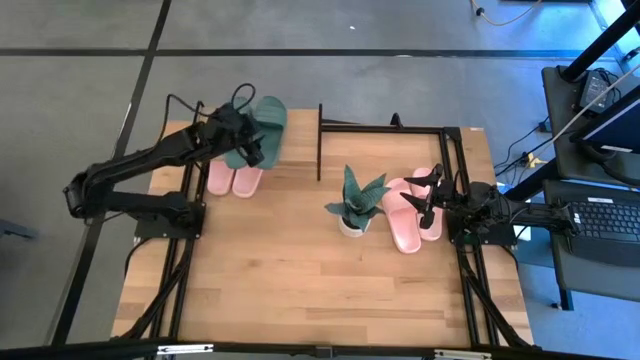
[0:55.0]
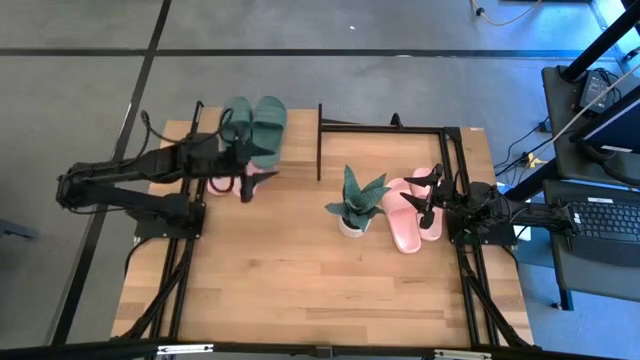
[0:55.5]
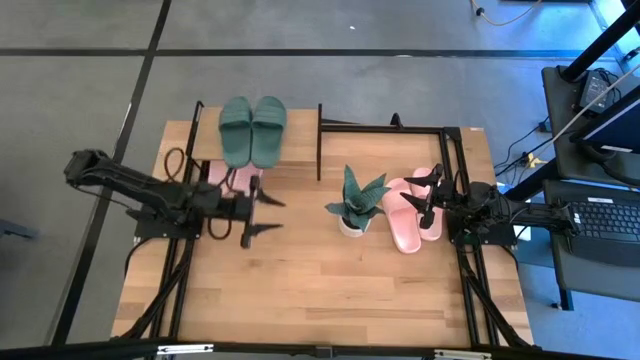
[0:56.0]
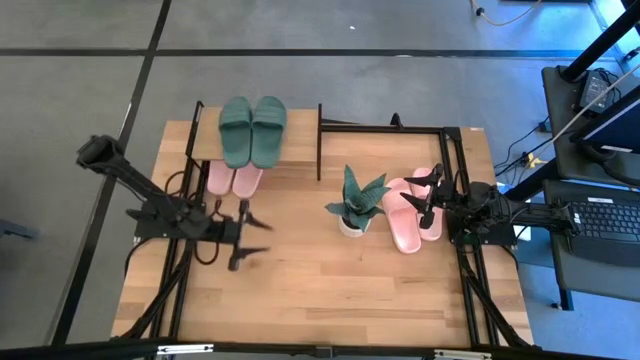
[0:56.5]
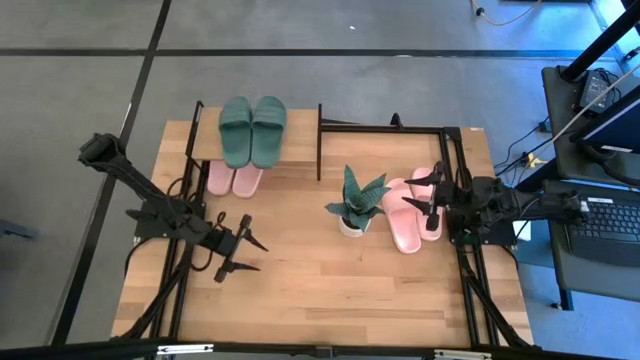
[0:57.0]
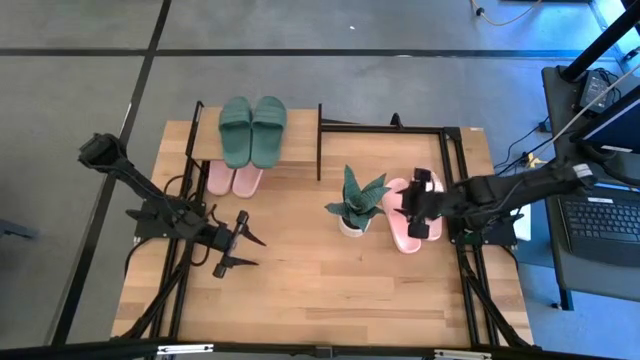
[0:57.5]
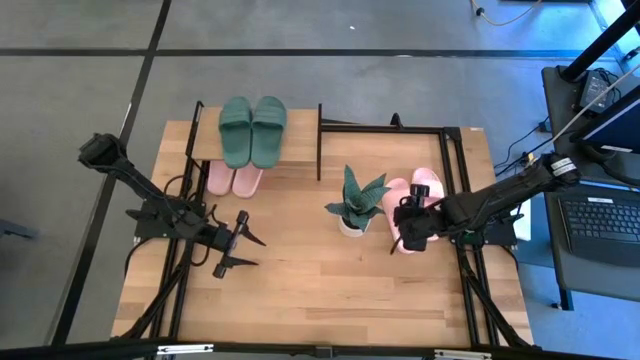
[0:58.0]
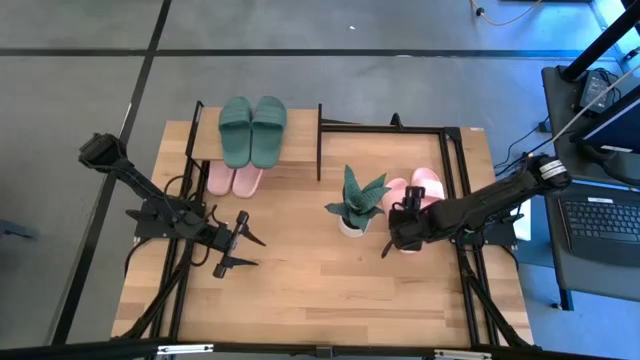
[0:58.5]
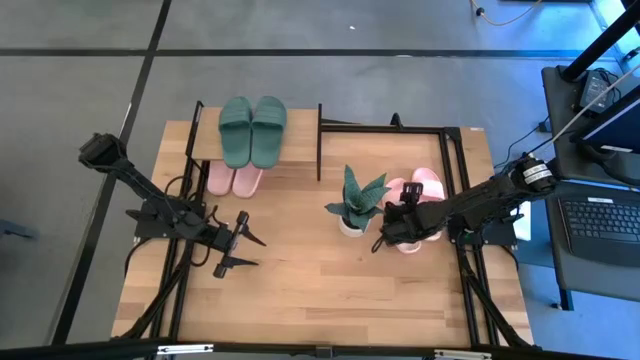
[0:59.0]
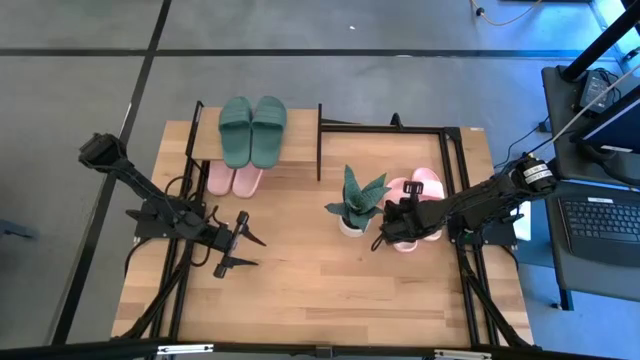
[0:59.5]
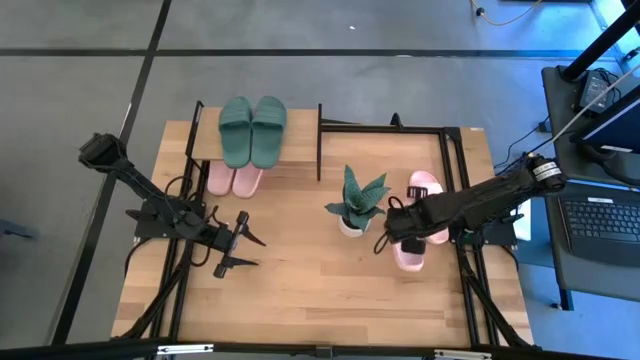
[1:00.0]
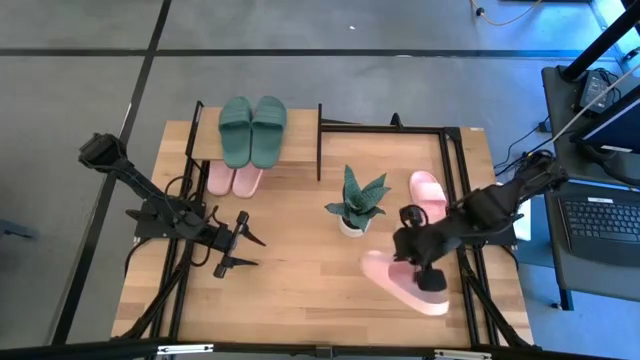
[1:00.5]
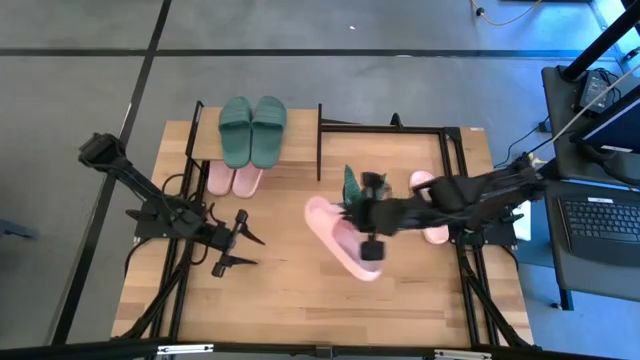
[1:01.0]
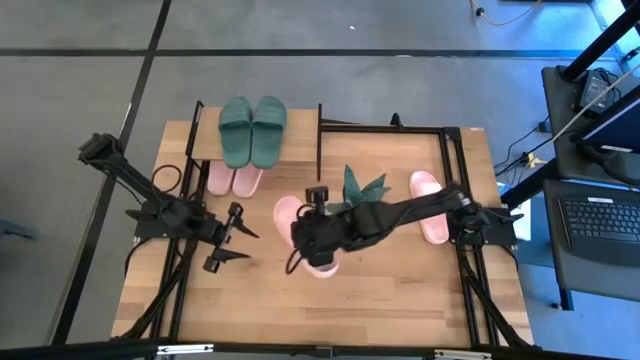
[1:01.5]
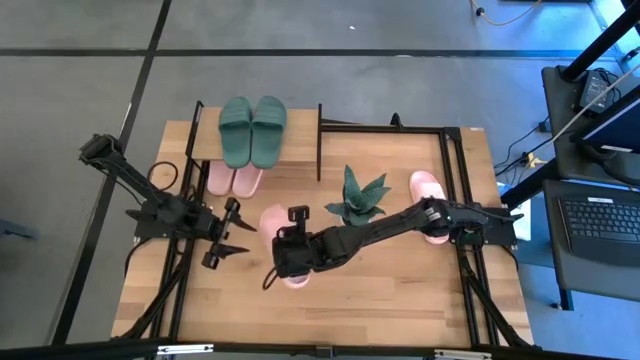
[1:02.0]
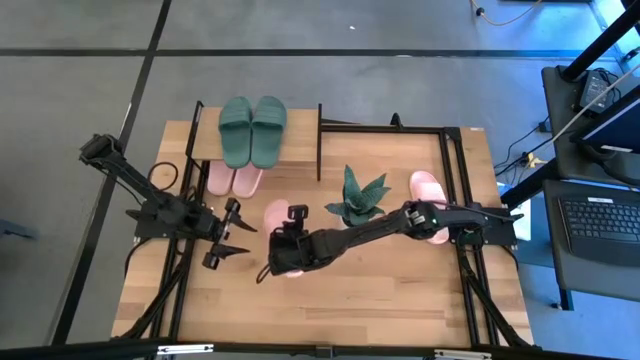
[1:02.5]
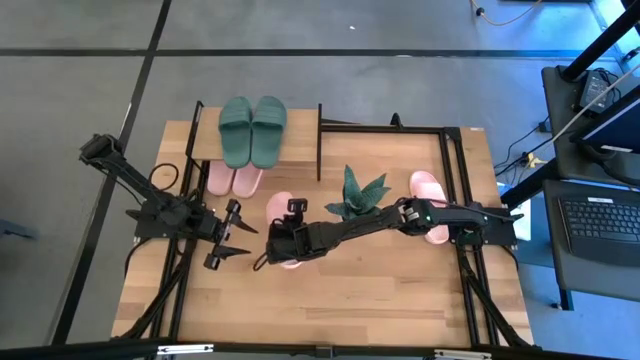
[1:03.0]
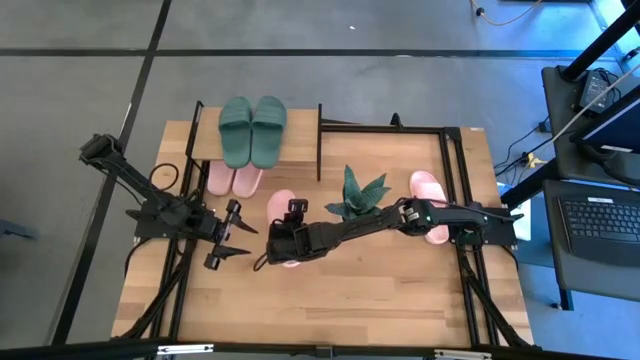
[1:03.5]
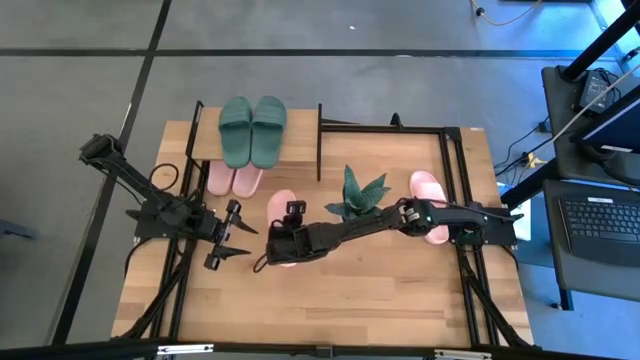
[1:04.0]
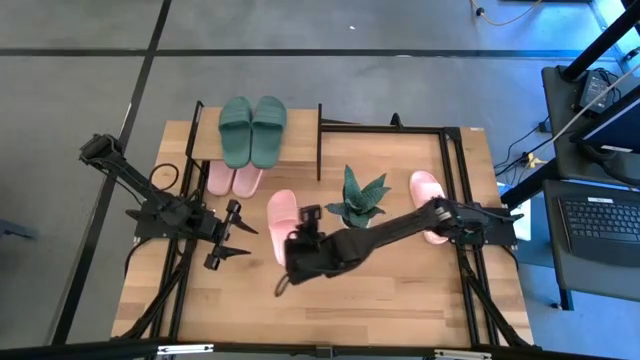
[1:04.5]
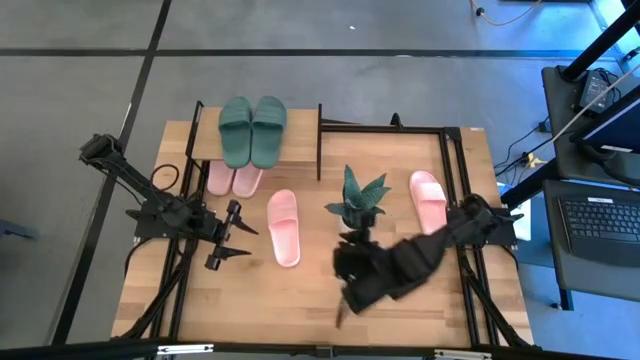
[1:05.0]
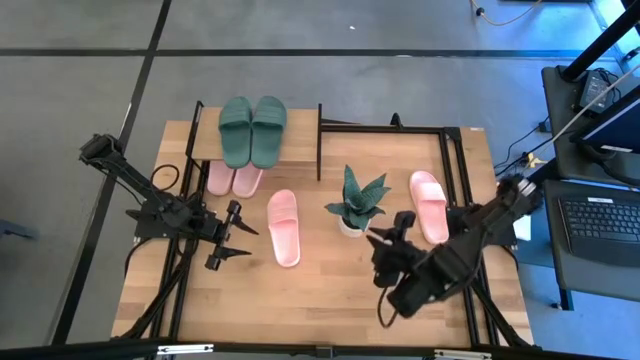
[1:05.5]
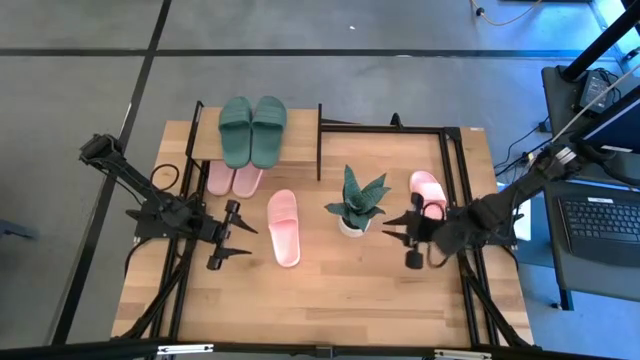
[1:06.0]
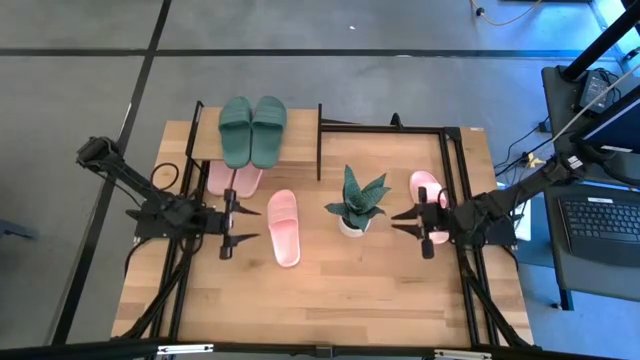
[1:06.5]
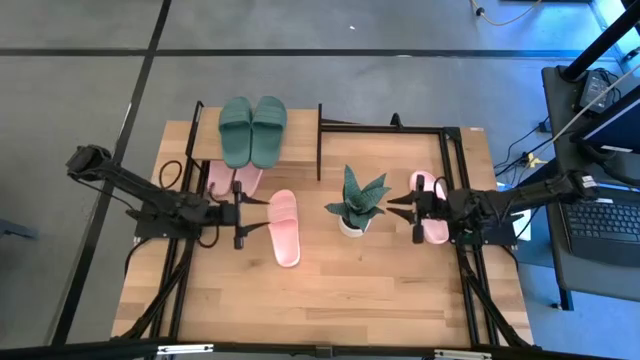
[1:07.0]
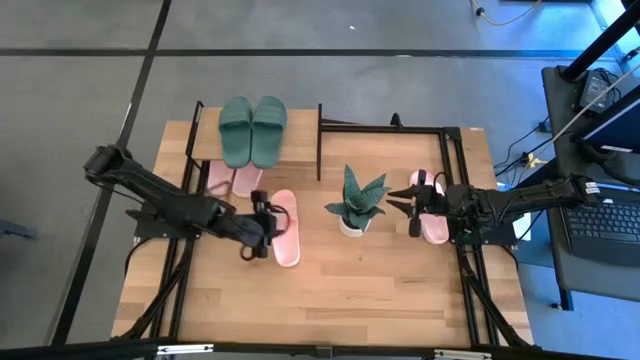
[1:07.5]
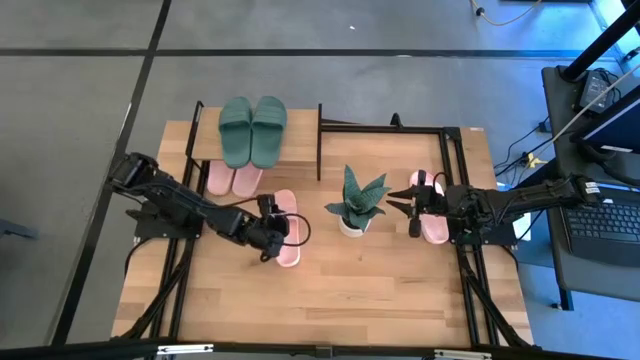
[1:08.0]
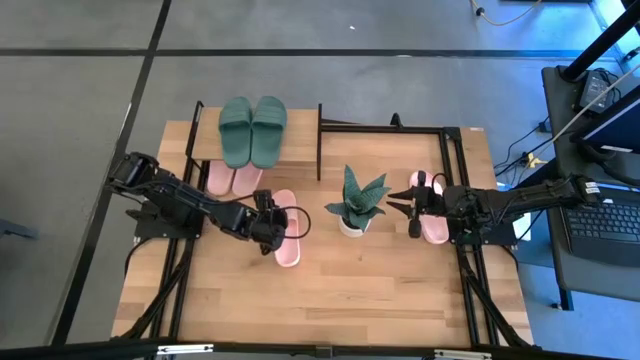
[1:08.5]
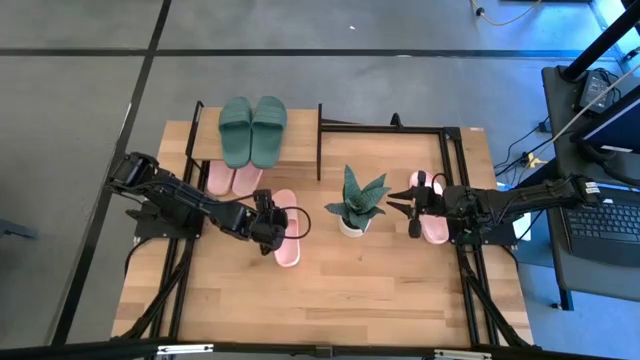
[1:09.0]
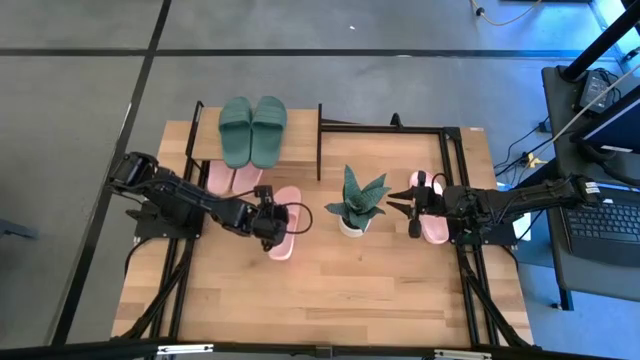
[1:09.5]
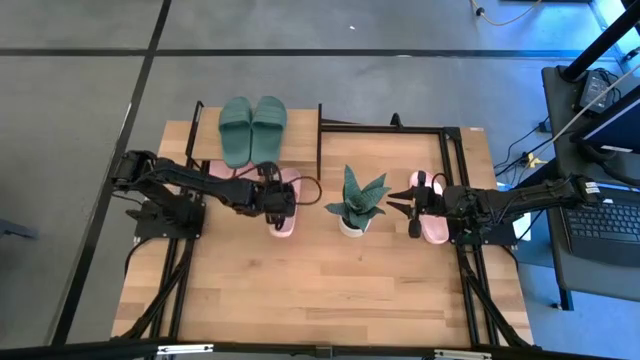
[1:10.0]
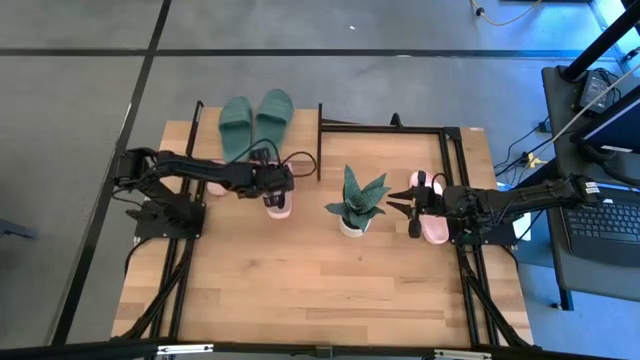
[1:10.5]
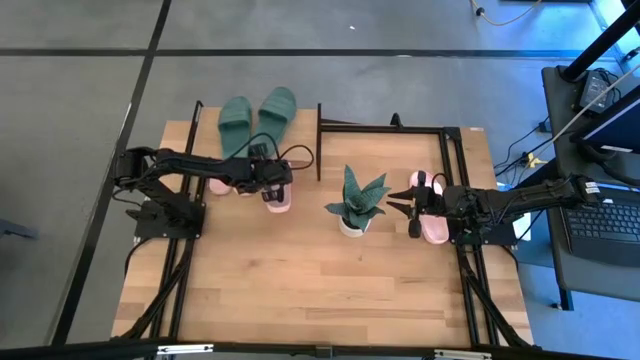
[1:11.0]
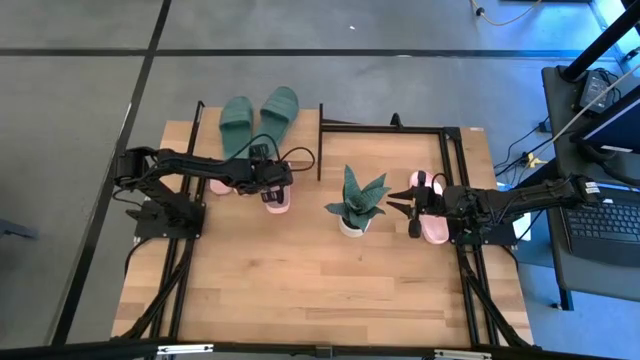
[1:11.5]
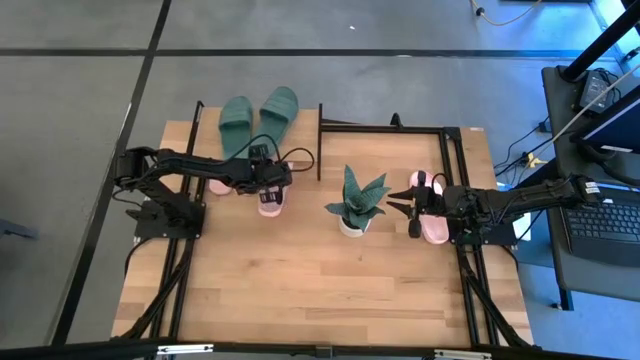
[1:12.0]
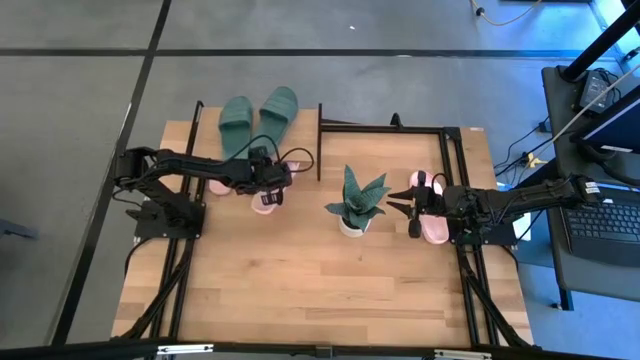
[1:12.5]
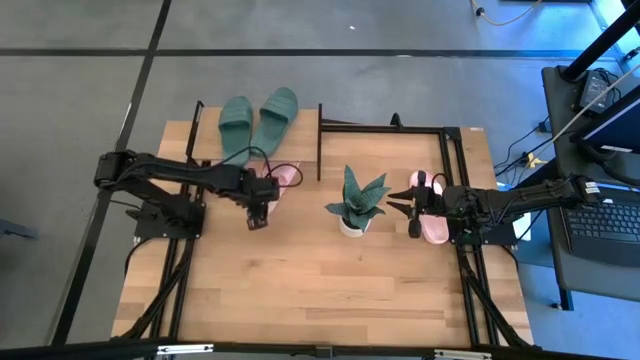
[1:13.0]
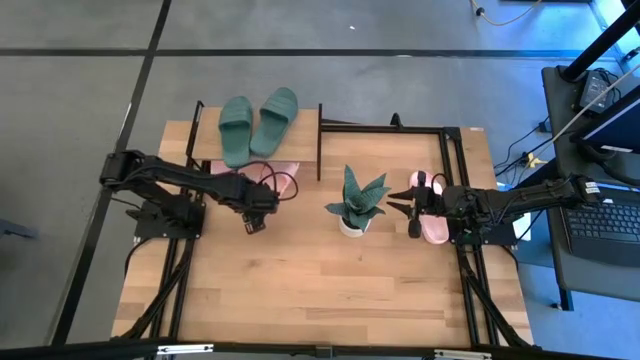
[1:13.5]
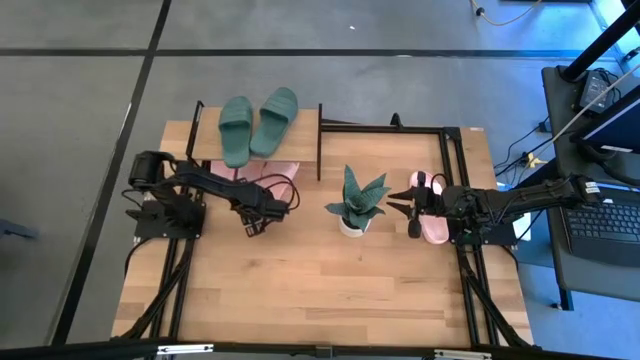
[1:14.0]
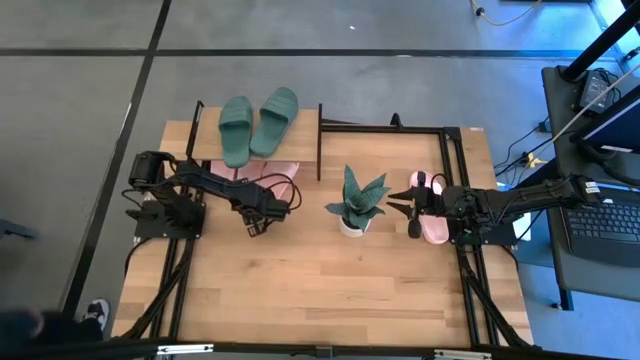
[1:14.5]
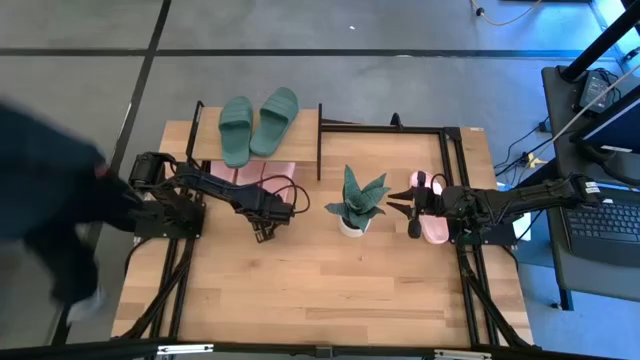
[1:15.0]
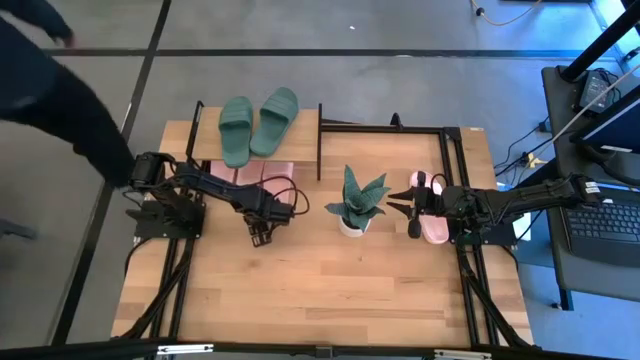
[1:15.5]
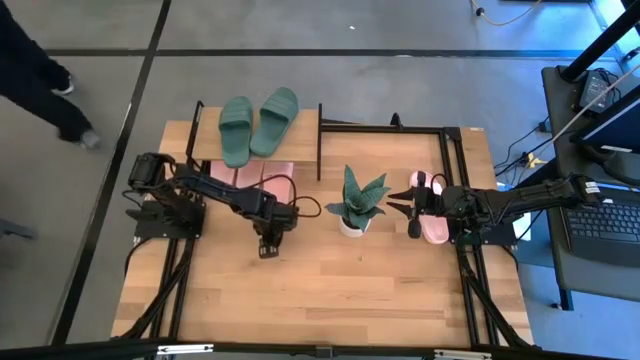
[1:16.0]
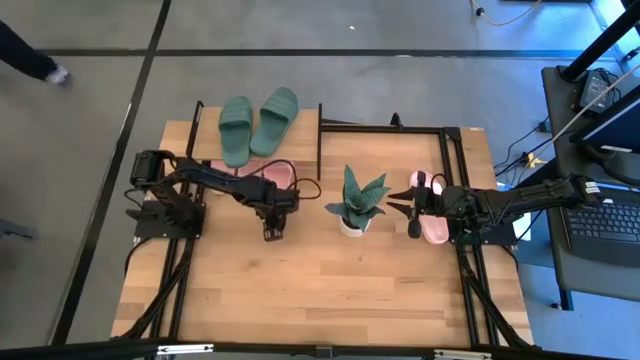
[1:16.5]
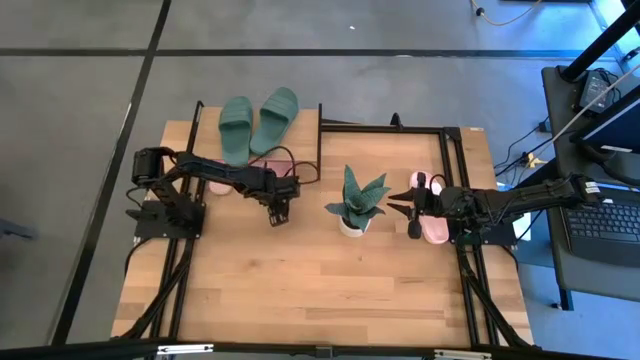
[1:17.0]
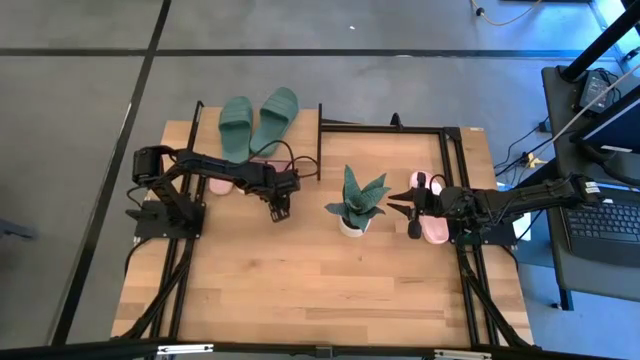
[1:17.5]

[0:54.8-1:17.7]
Task: Pick and place slides into the shelf
Put the pink slipper under the shelf
